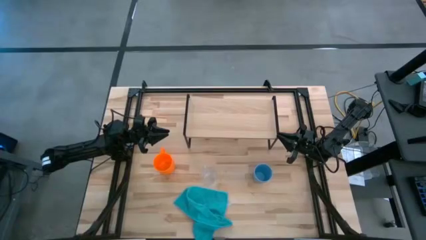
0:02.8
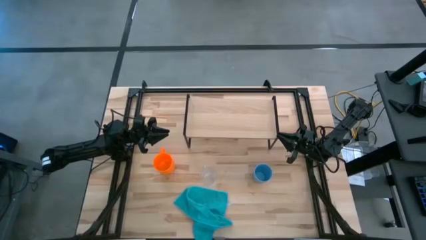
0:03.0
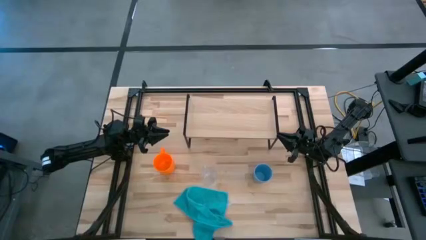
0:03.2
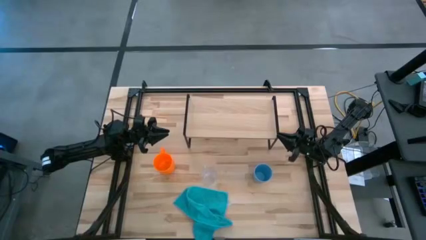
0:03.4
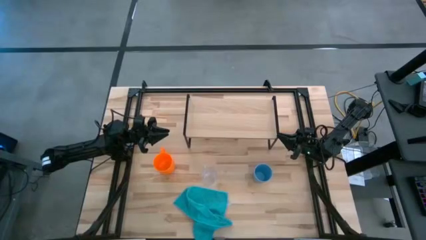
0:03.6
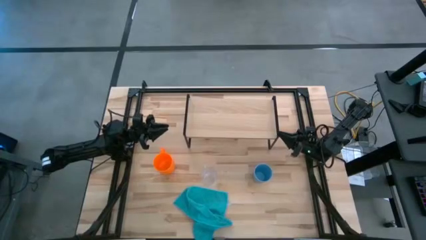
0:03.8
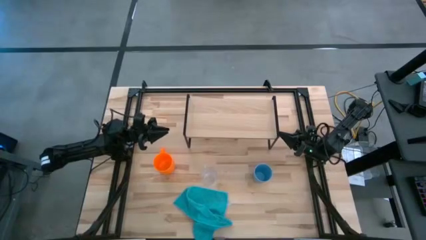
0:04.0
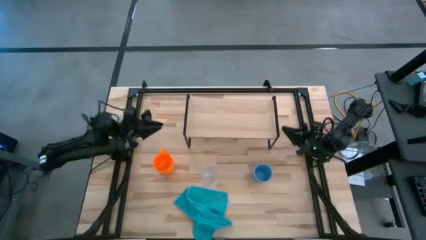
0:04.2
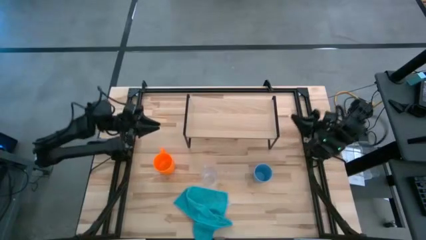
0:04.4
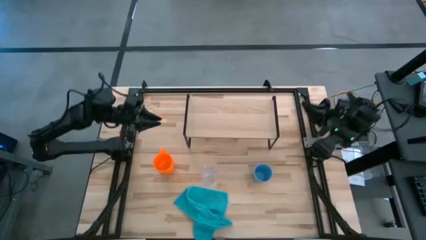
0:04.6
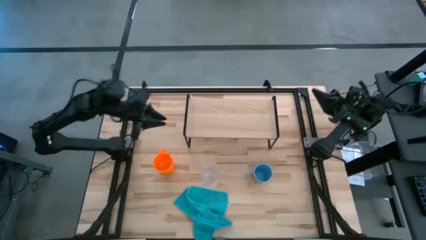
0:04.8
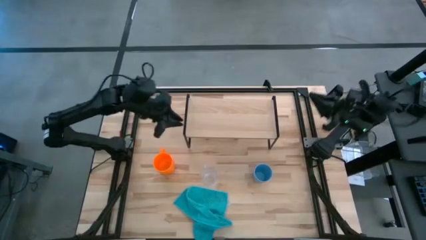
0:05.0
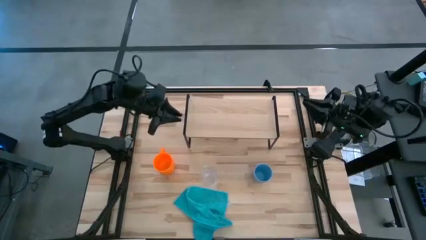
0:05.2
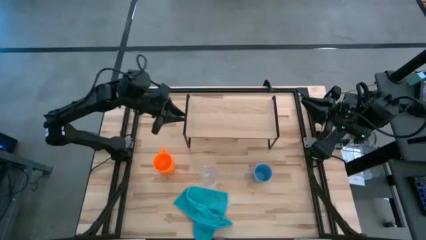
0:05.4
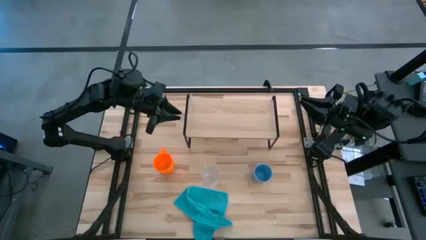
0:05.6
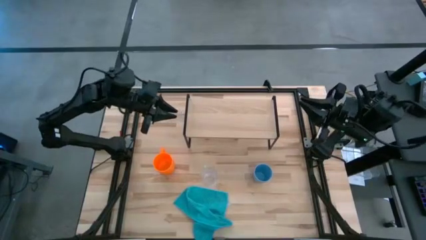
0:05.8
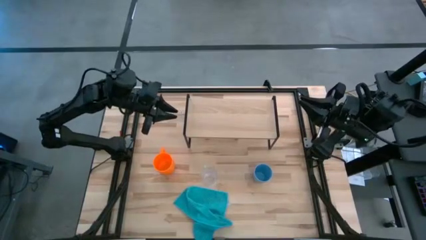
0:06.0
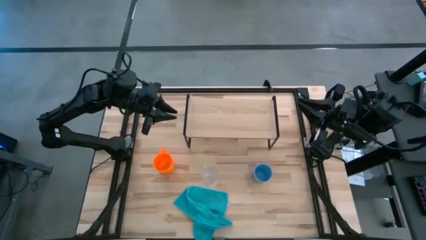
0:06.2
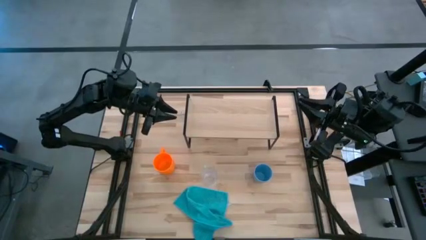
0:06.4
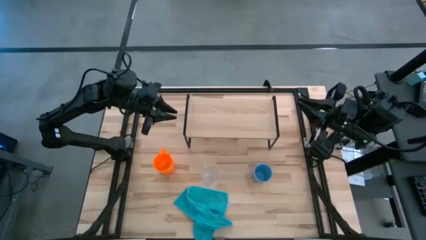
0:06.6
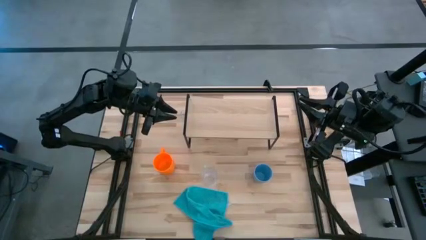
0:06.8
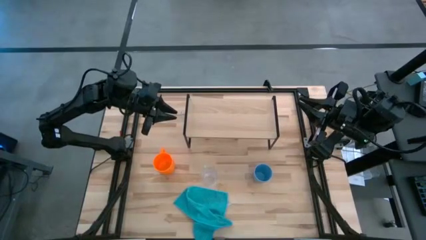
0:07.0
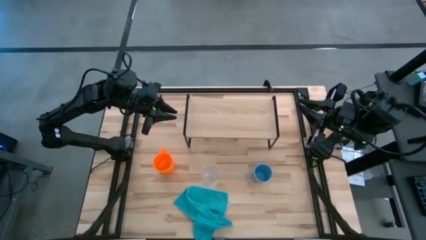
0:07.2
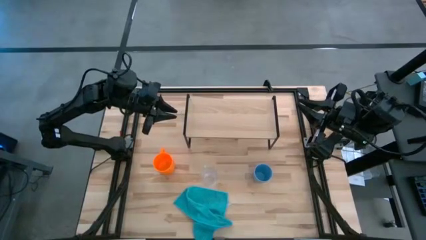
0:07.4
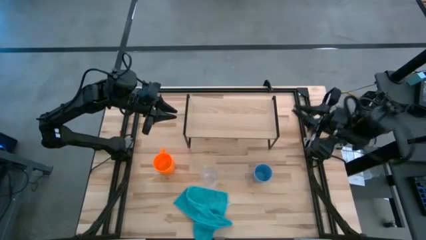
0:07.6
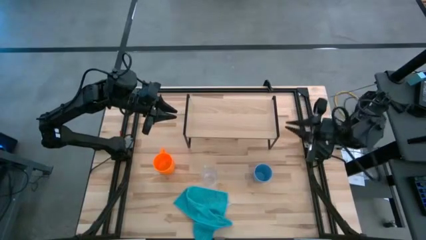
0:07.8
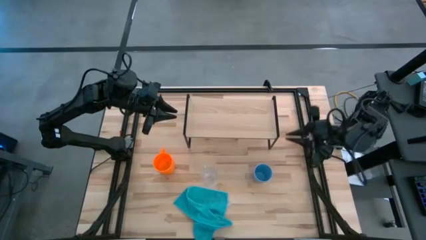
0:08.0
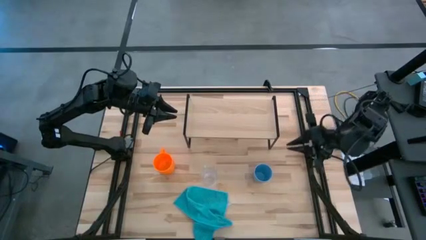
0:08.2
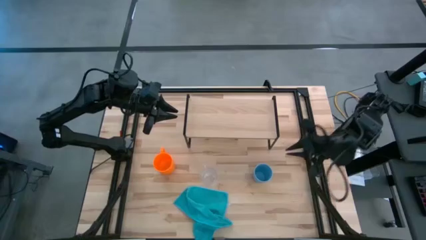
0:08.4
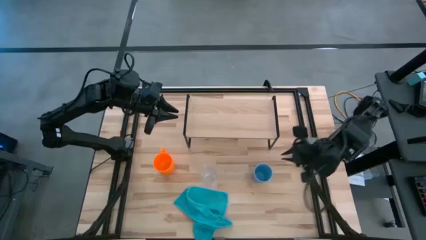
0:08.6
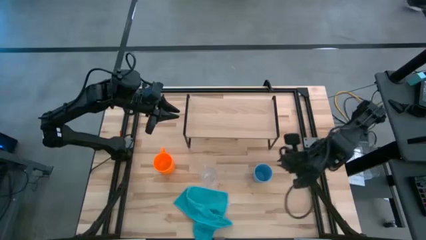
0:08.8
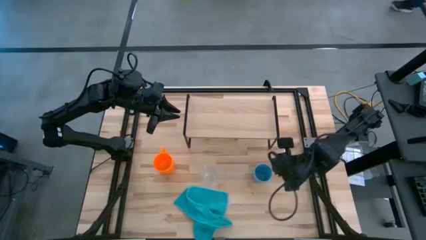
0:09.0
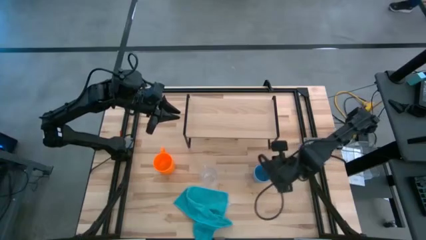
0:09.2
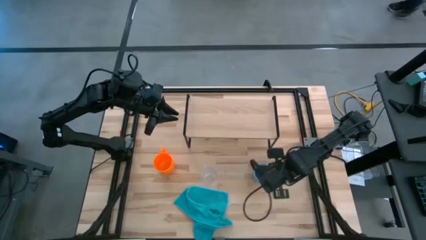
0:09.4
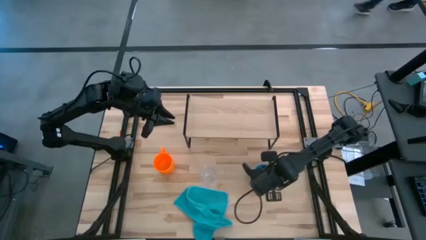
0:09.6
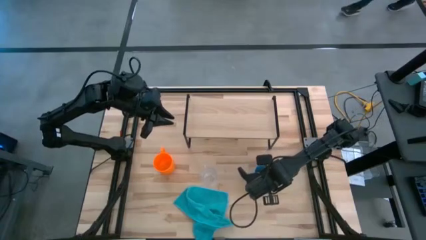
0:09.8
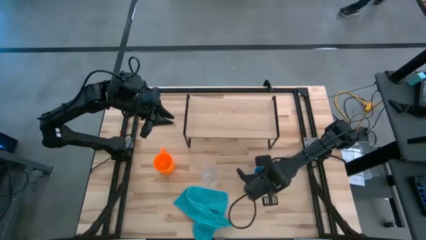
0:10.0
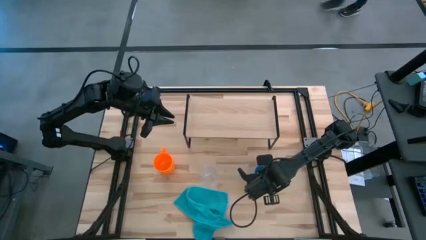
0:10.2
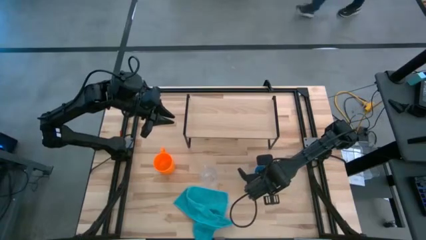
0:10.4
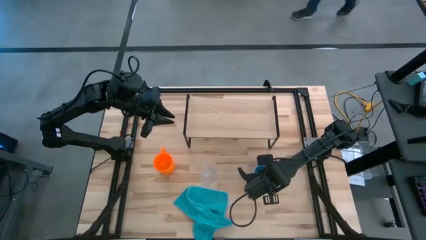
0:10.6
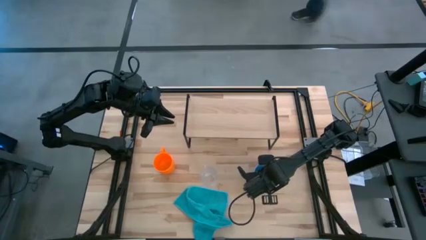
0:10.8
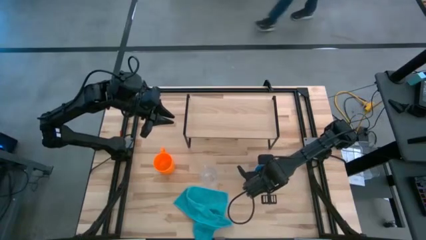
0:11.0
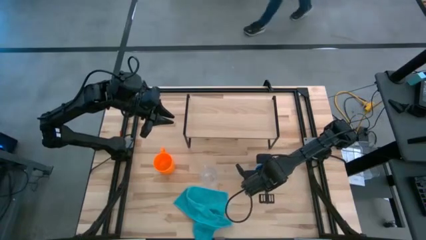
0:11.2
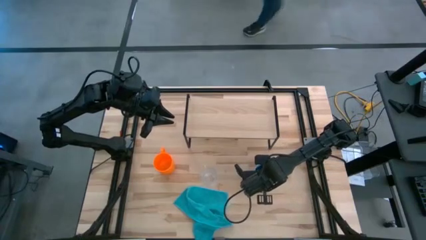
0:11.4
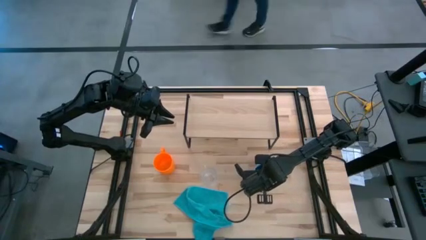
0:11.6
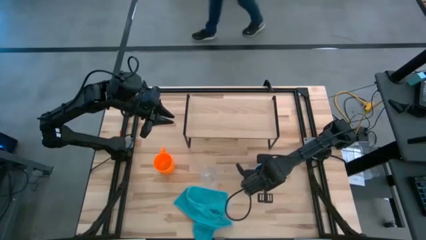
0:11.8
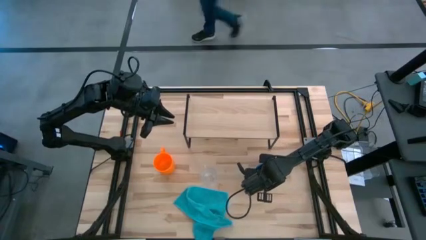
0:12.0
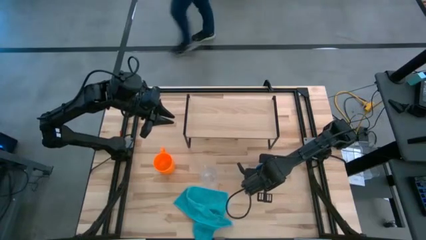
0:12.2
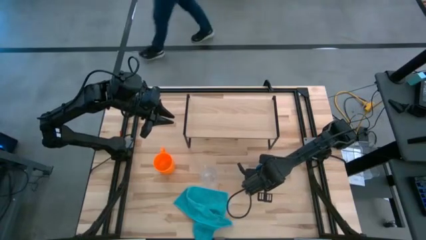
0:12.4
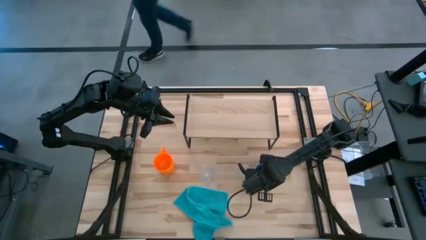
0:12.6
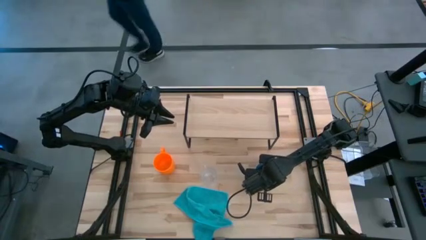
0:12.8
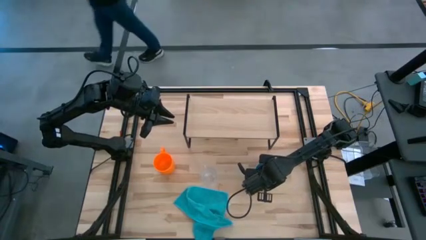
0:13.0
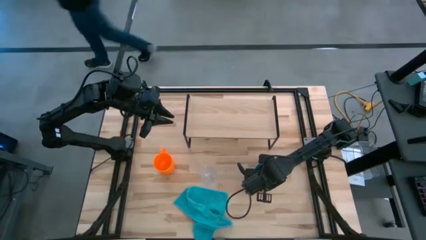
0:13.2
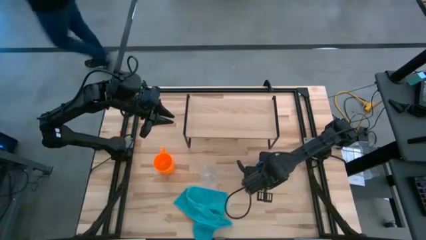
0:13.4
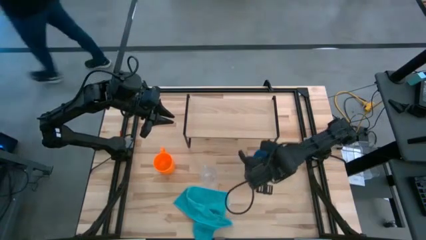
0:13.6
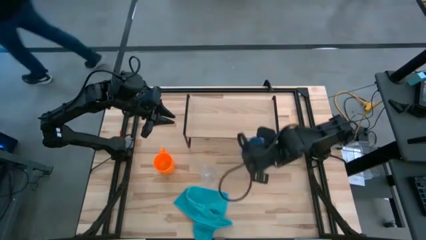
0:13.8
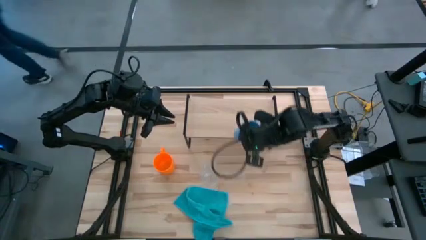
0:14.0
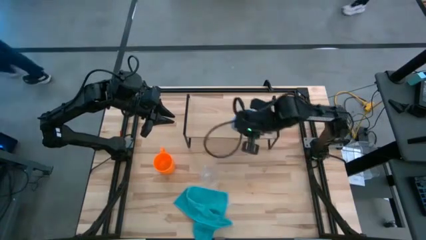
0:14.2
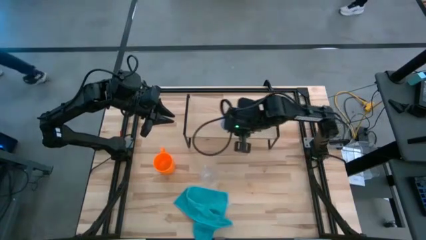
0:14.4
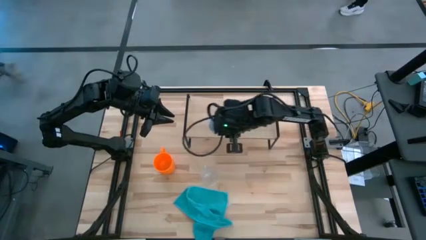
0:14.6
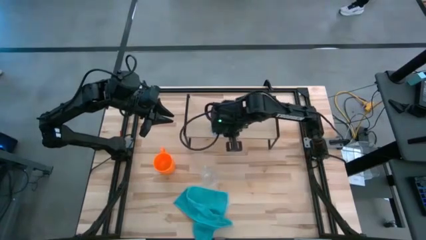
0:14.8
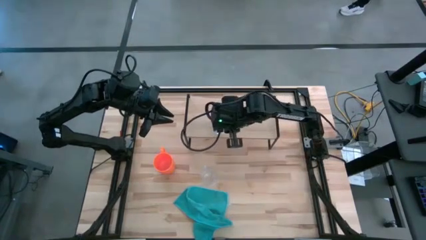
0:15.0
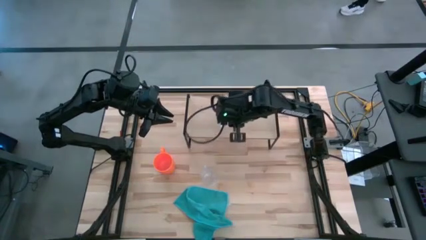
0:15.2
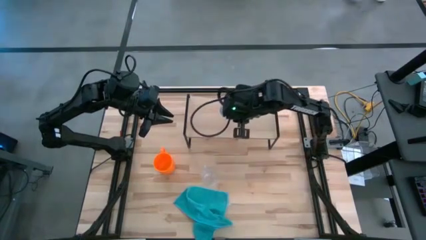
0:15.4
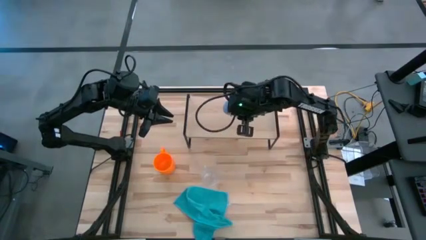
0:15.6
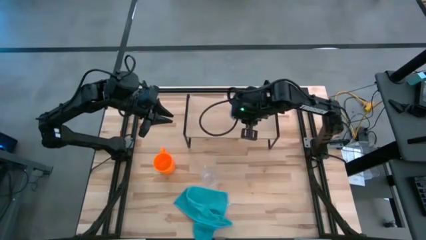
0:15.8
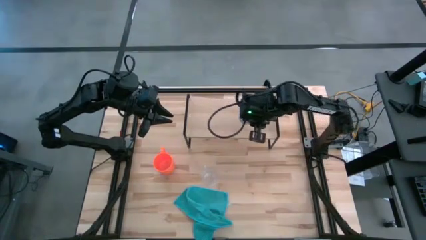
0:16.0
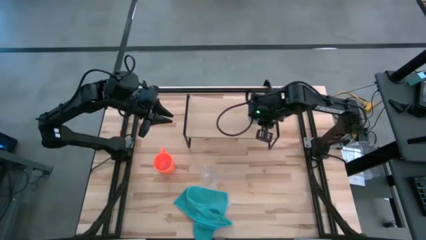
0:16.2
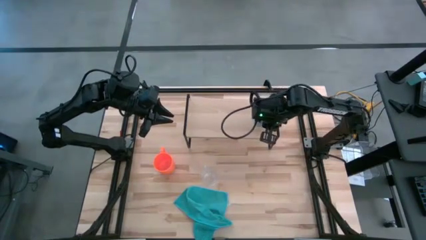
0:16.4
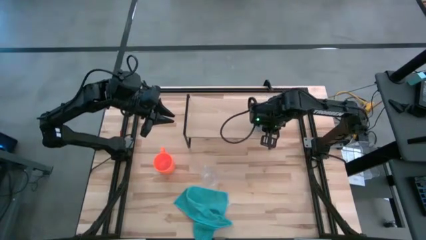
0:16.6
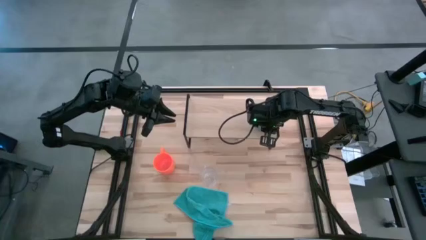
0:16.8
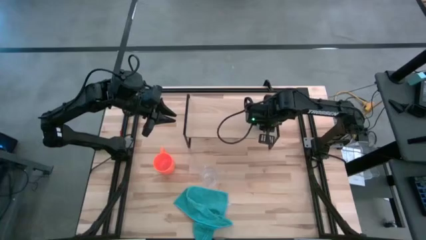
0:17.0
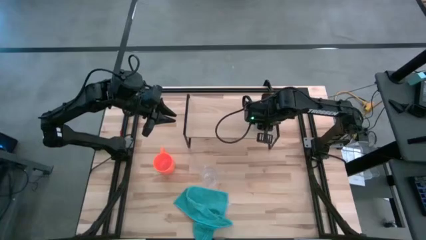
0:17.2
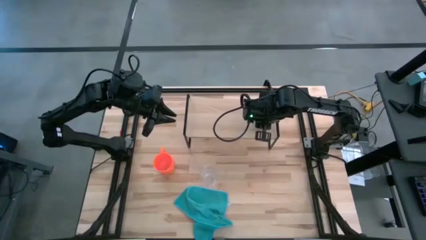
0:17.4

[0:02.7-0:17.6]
Task: Stack small to large cups/mugs on shelf
Put the blue cup on the shelf
